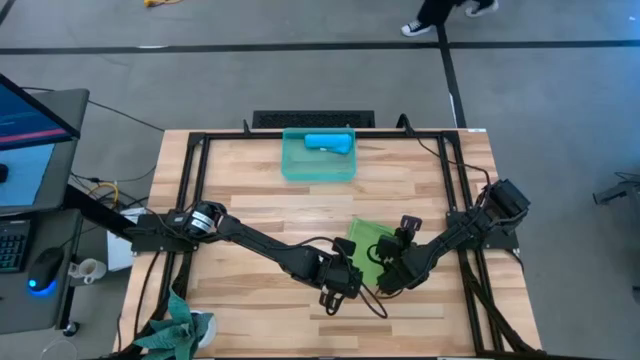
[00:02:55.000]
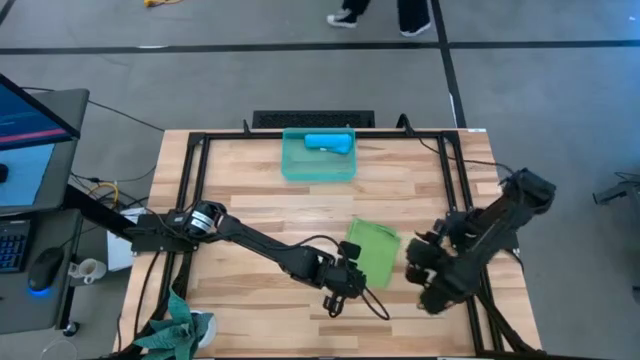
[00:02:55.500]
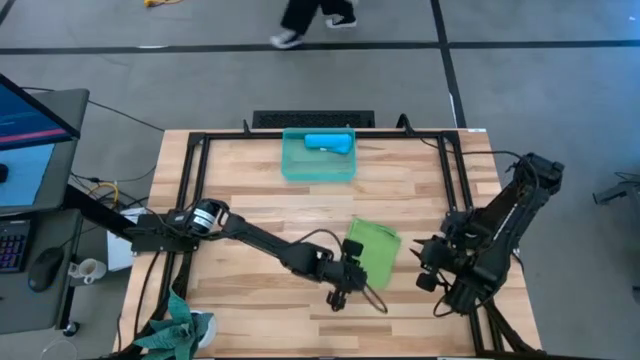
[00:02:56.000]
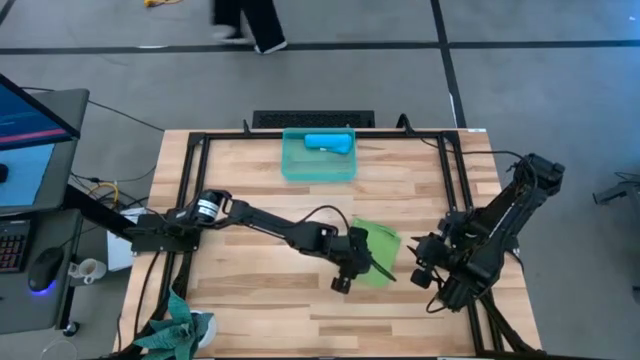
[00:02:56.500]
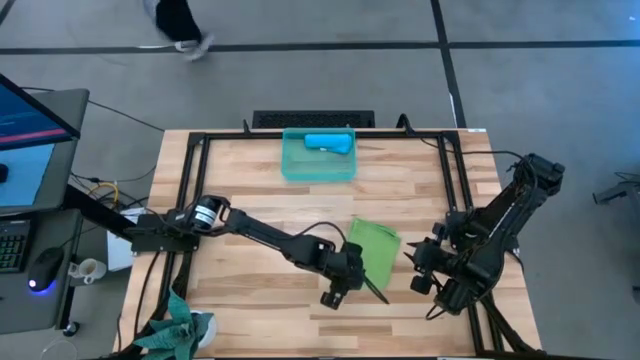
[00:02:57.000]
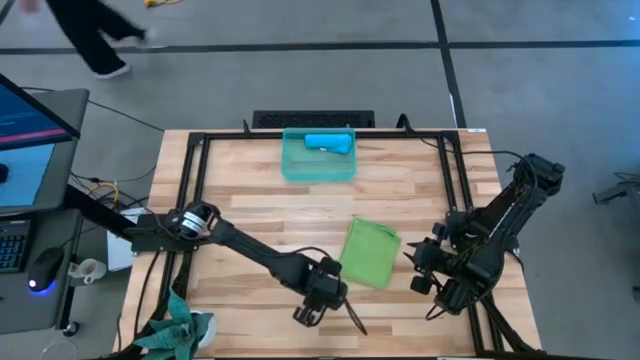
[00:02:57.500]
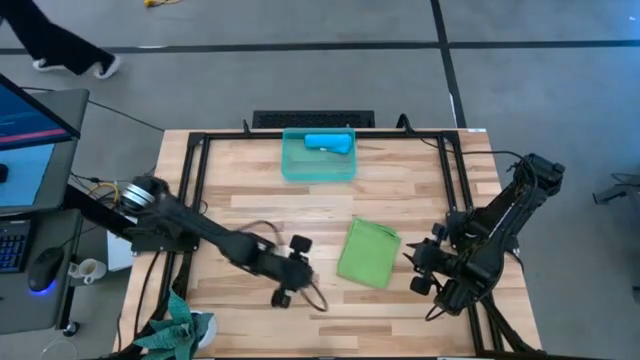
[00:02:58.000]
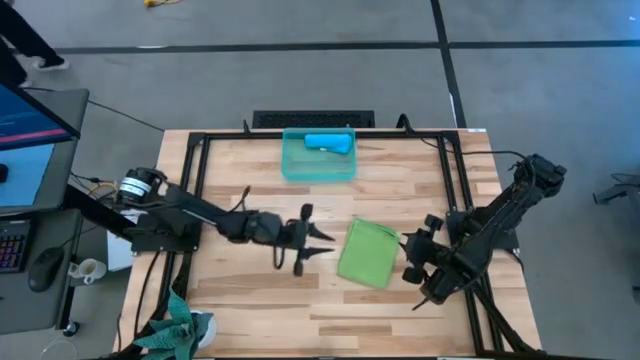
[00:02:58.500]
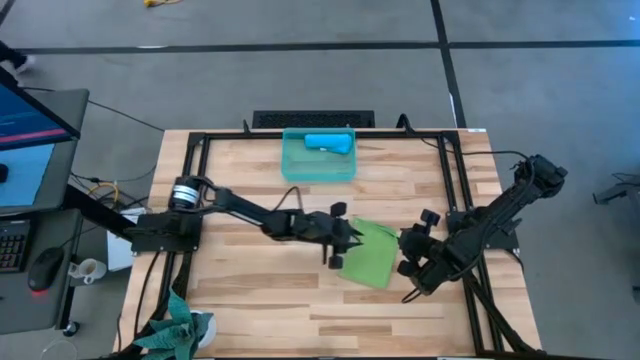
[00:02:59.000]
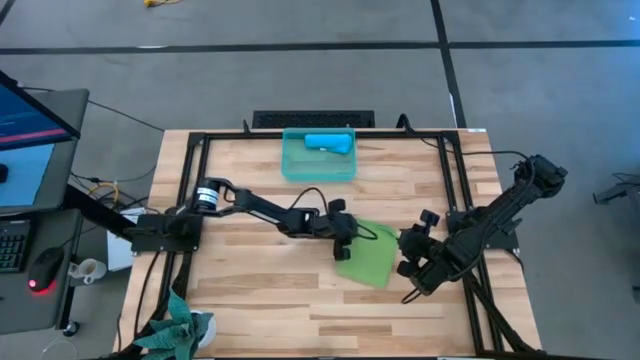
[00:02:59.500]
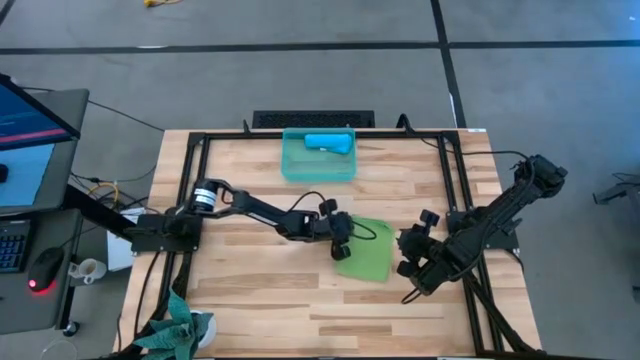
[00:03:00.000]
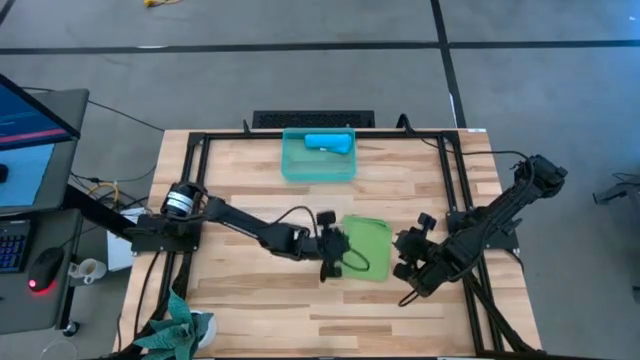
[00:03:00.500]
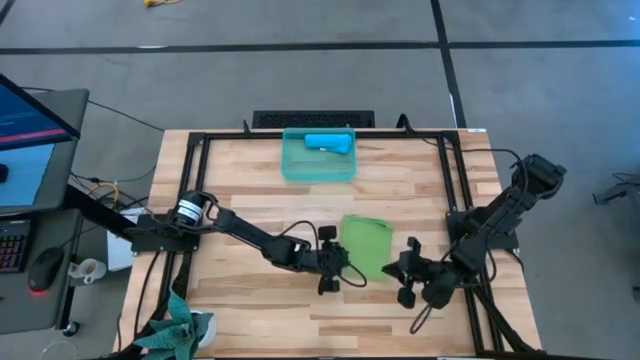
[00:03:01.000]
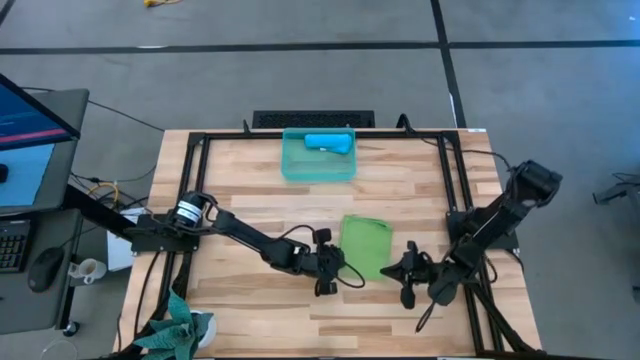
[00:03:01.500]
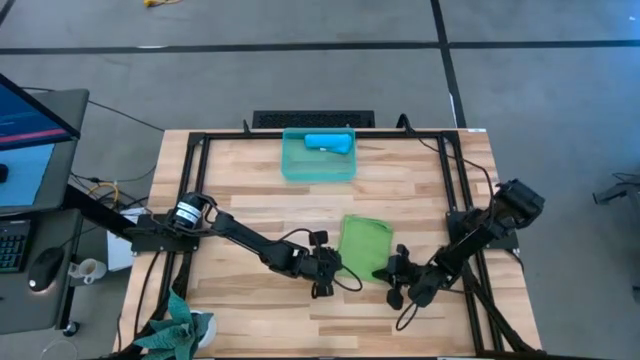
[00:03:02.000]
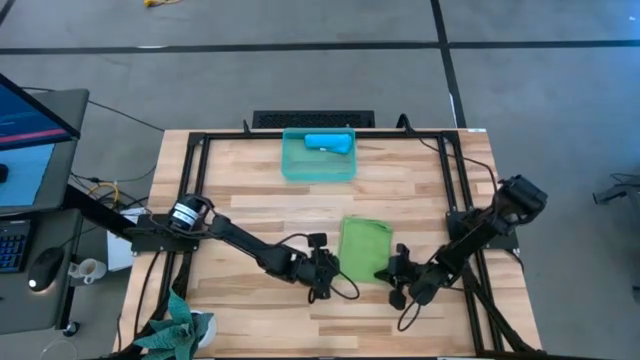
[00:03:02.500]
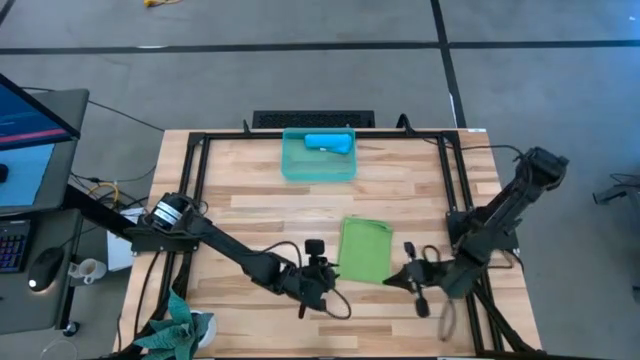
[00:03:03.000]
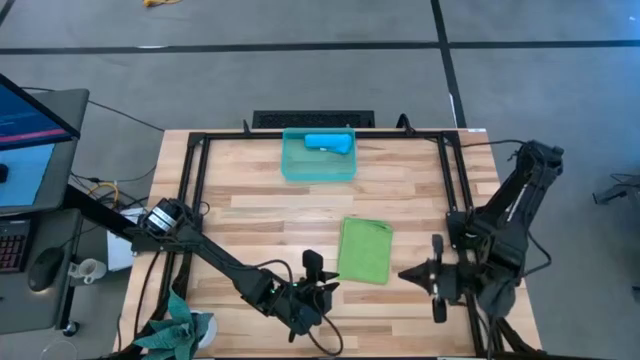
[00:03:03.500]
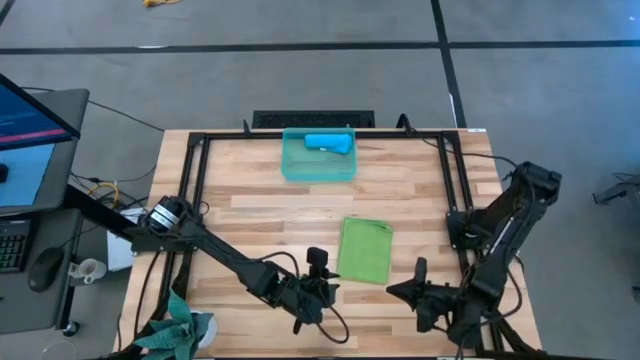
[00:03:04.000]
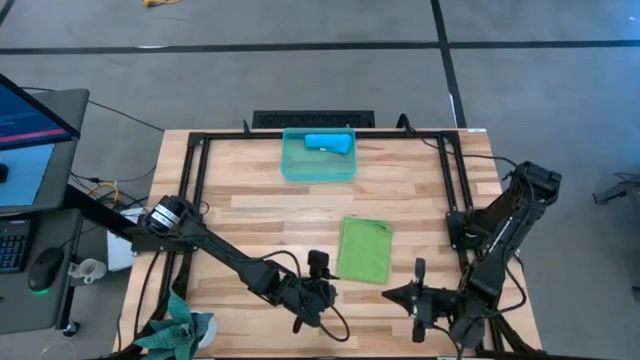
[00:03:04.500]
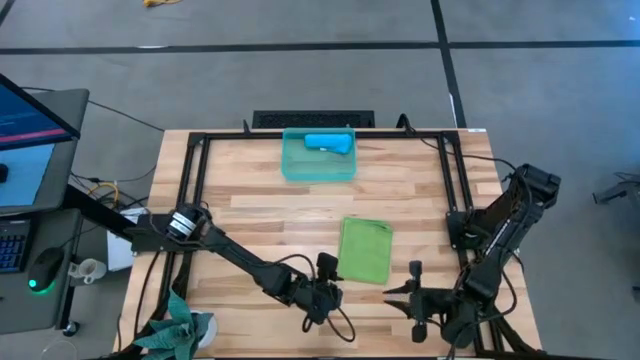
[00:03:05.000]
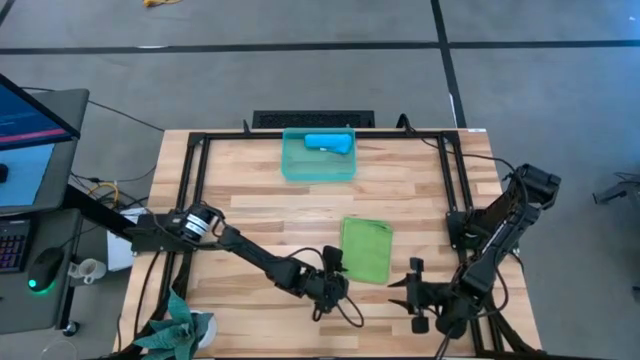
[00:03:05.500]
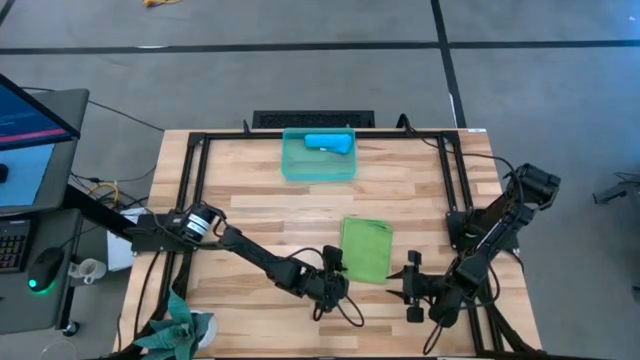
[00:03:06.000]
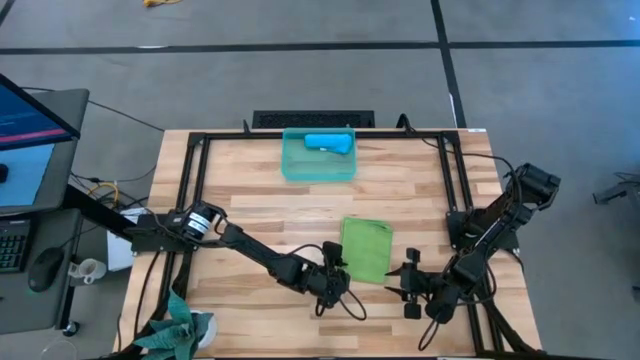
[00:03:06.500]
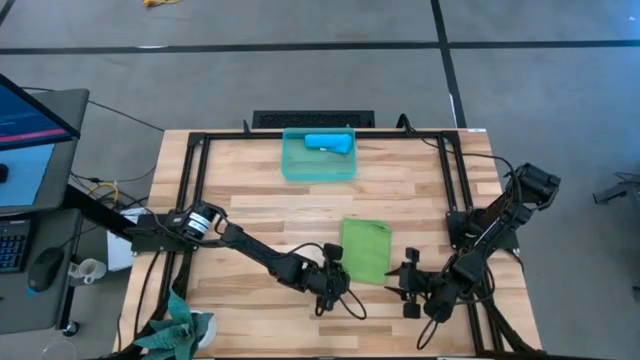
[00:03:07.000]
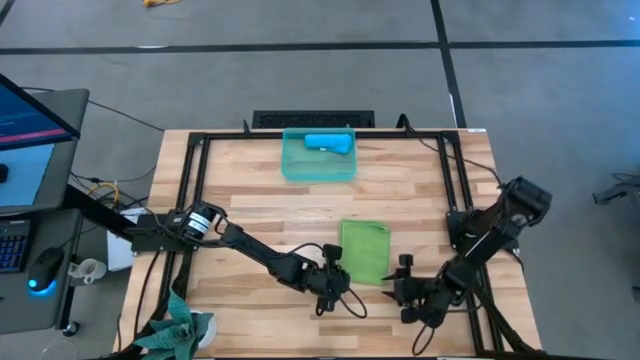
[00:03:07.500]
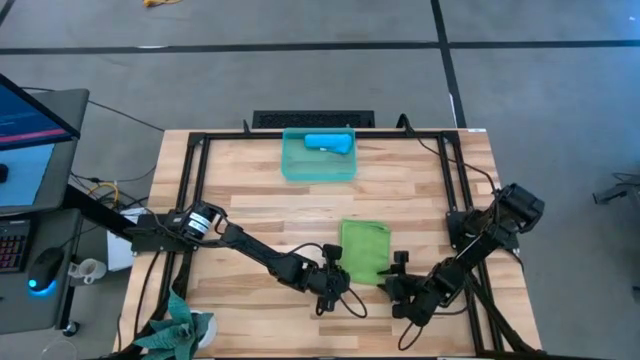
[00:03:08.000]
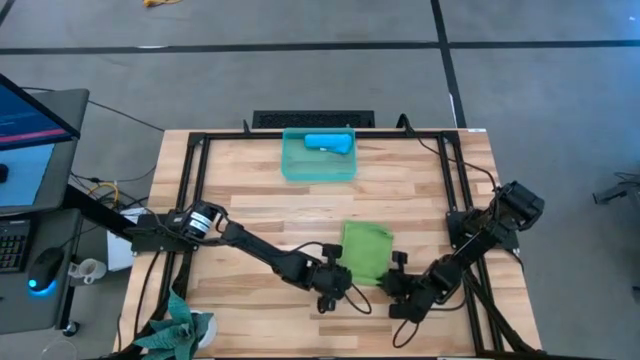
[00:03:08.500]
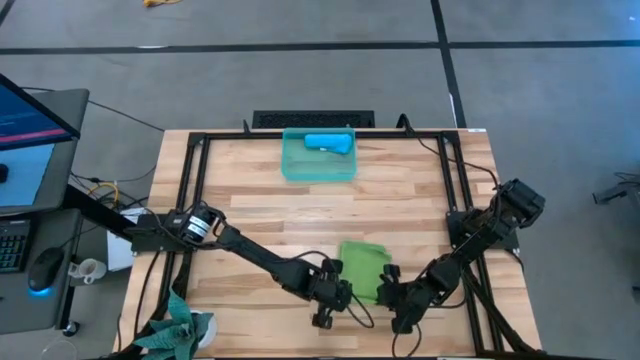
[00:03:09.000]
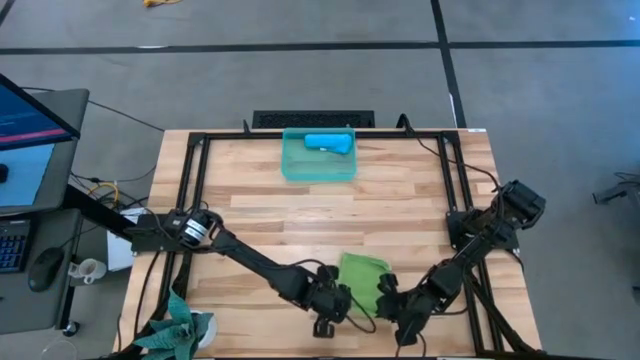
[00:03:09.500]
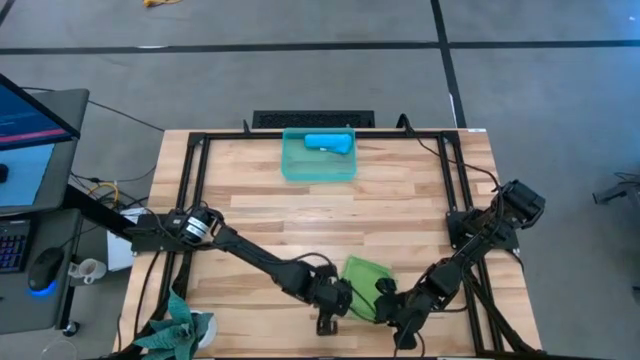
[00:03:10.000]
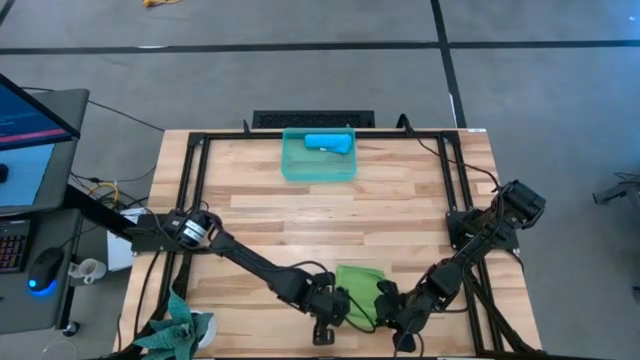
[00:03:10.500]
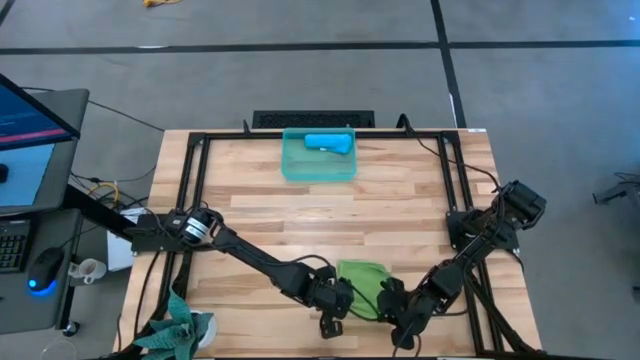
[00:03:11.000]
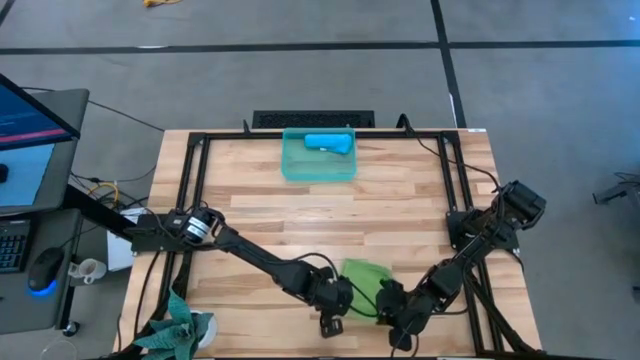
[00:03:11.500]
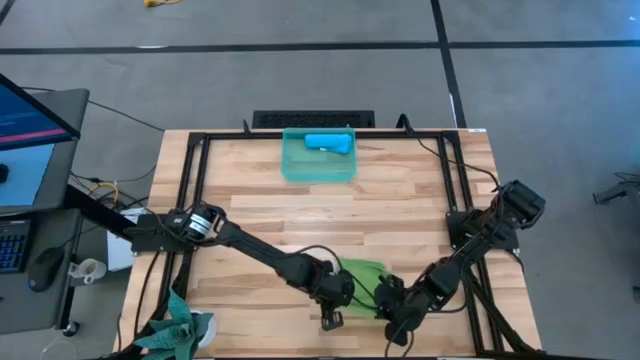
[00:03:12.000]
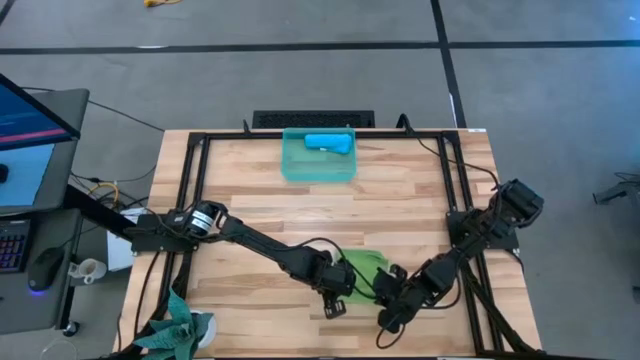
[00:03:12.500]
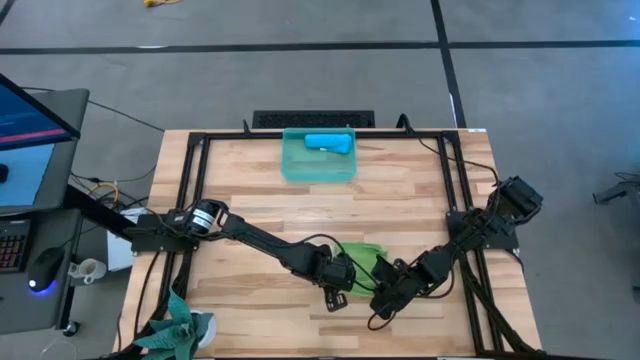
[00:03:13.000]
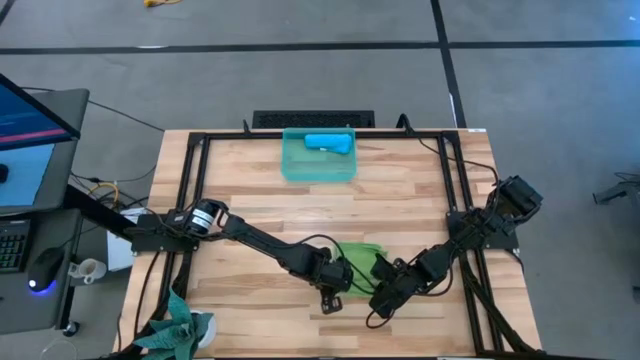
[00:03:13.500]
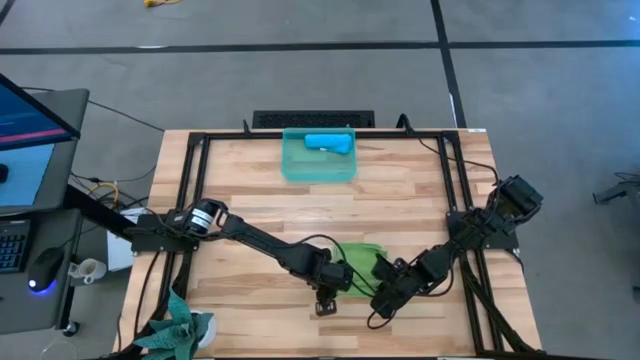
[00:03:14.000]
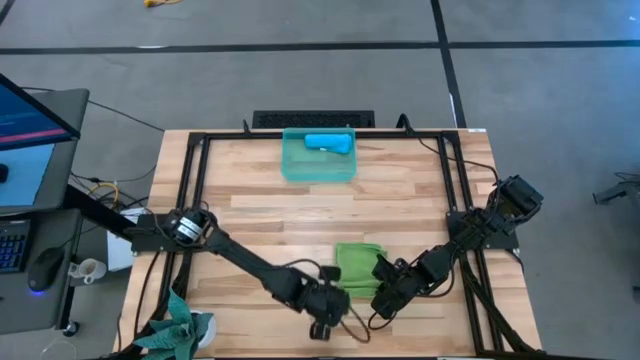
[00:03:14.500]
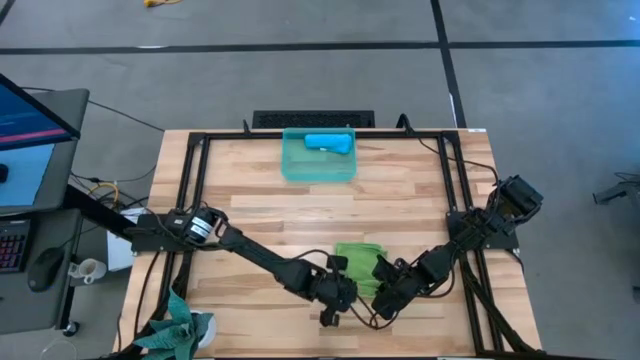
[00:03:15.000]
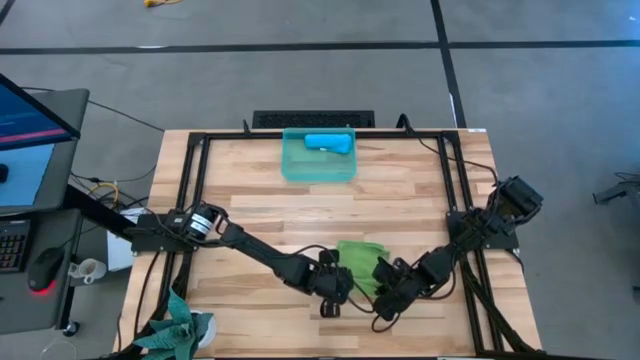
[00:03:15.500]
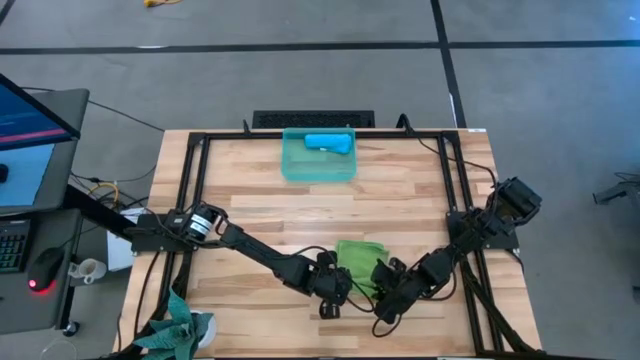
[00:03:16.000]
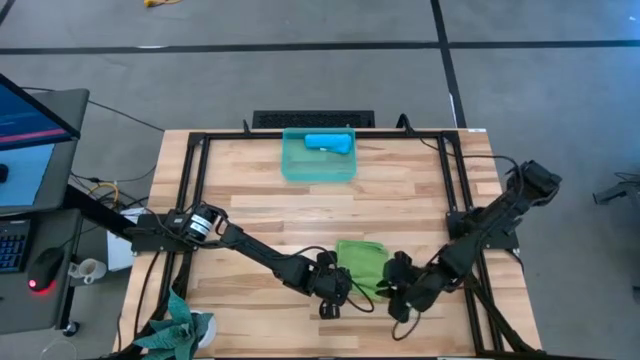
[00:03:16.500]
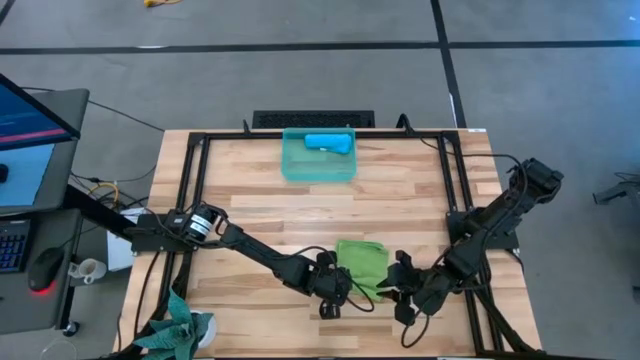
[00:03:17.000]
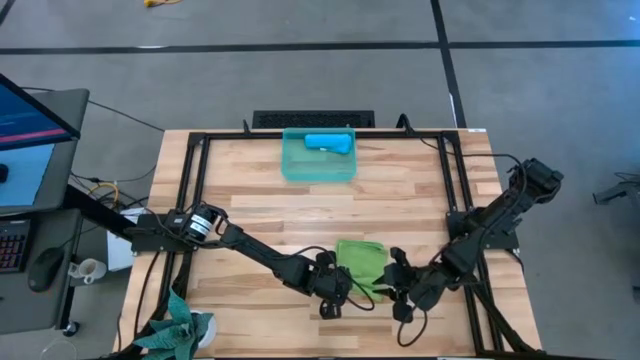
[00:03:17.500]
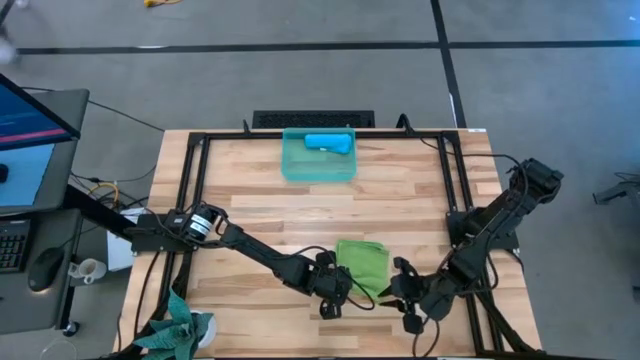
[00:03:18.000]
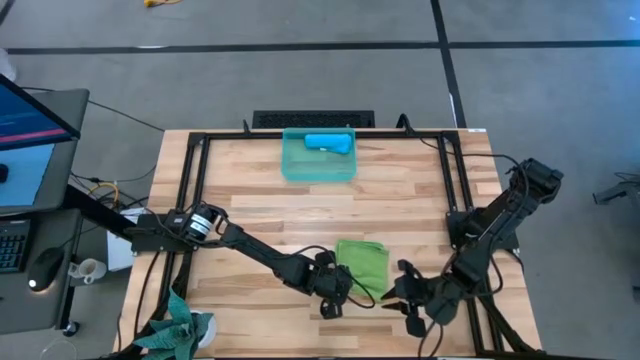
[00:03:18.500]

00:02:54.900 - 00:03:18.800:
Task: Roll microfiber towels into tight, uniform cylinder then place into a basket
Roll the green microfiber cloth
